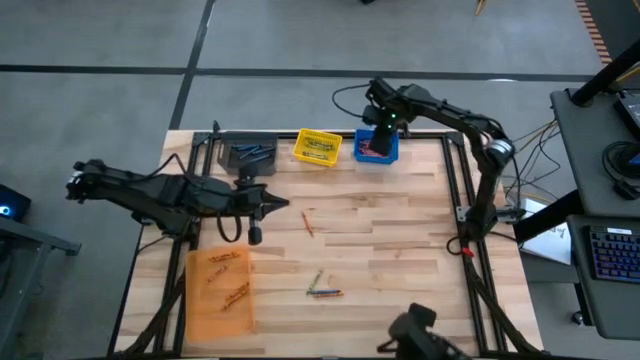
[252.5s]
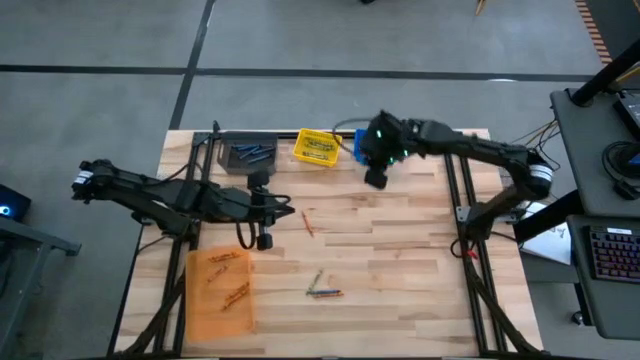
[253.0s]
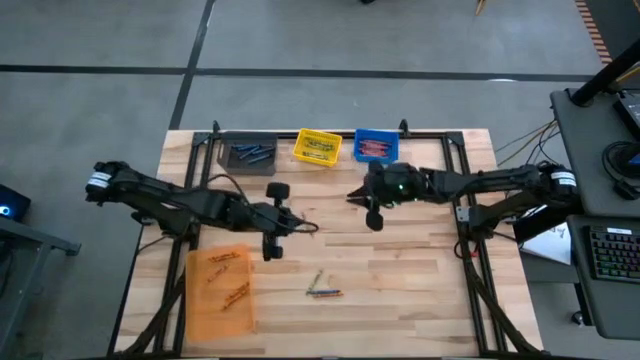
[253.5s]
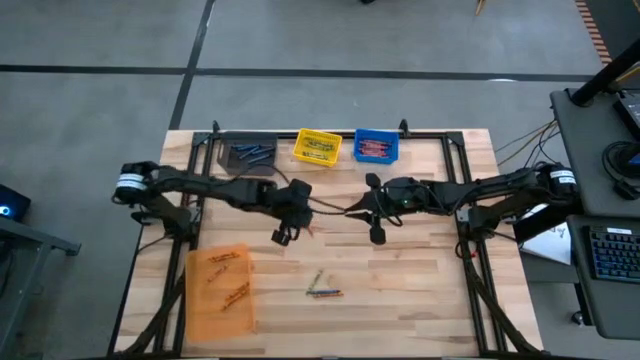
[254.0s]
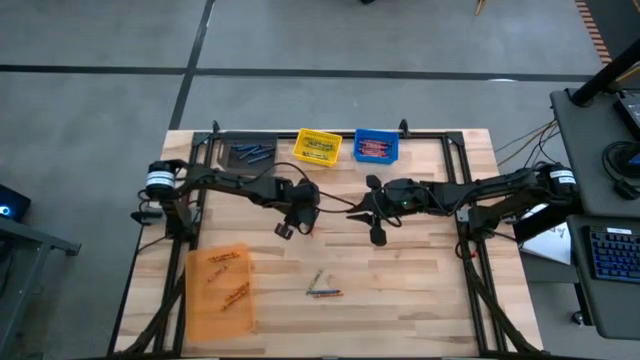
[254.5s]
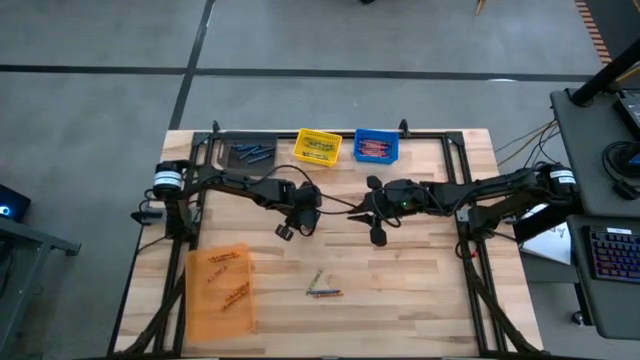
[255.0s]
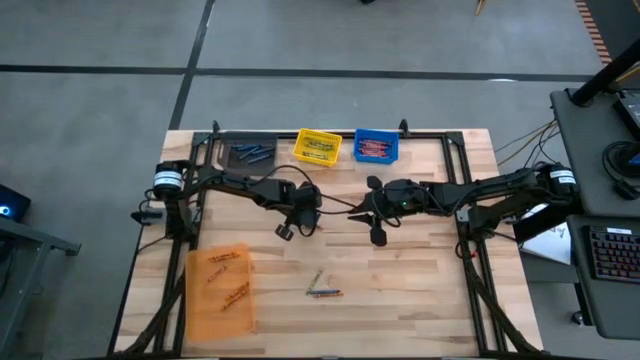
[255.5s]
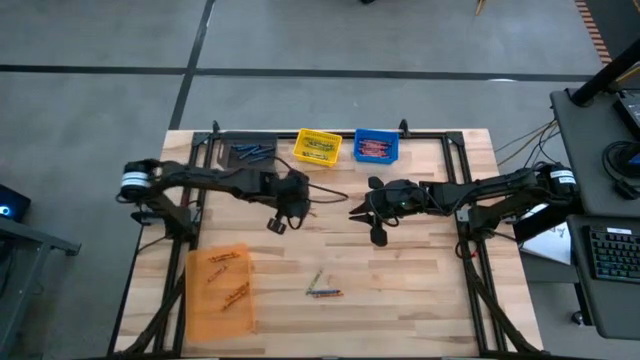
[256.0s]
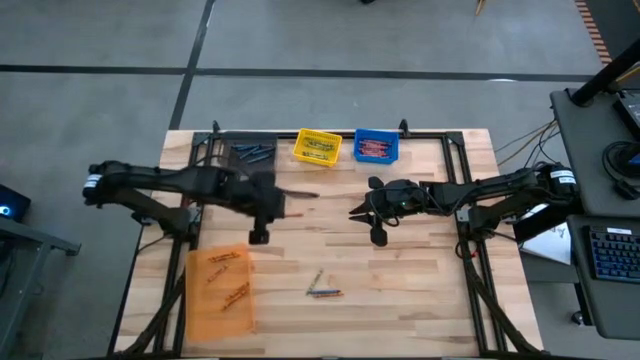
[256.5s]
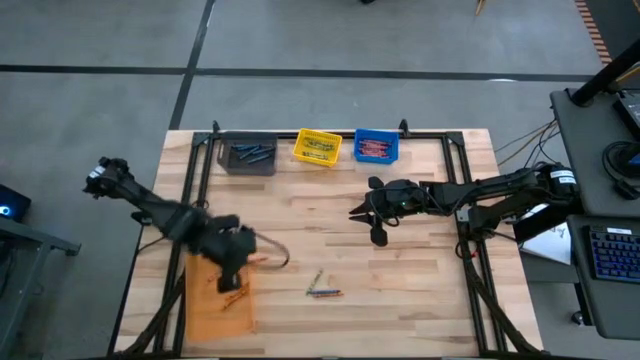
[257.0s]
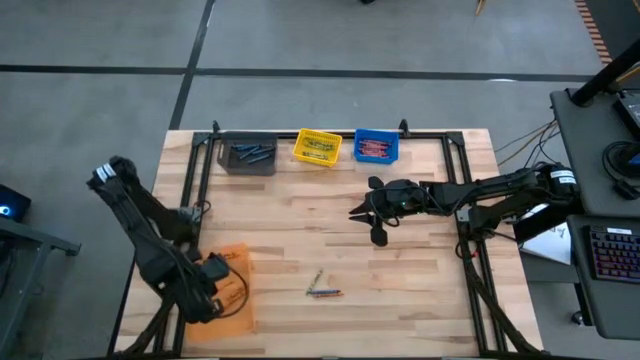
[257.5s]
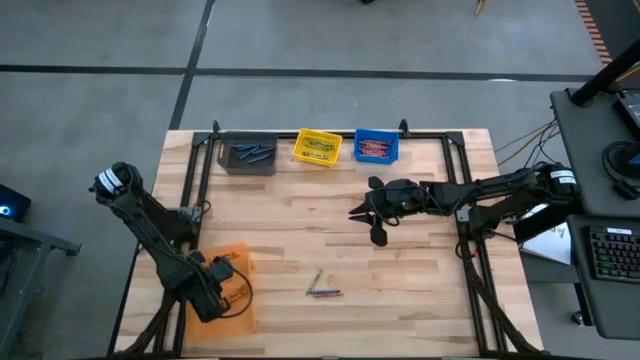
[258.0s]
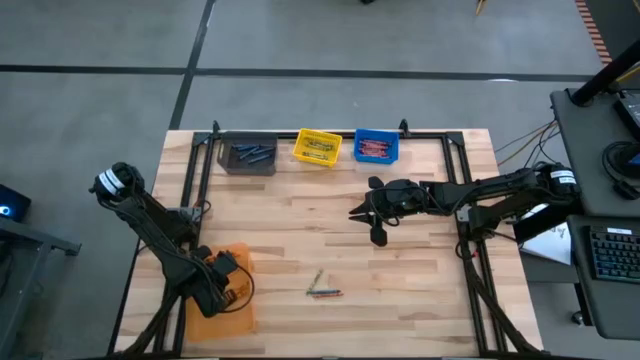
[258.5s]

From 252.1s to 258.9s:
Task: Sort crayons
Put the orange crayon into the orange bin

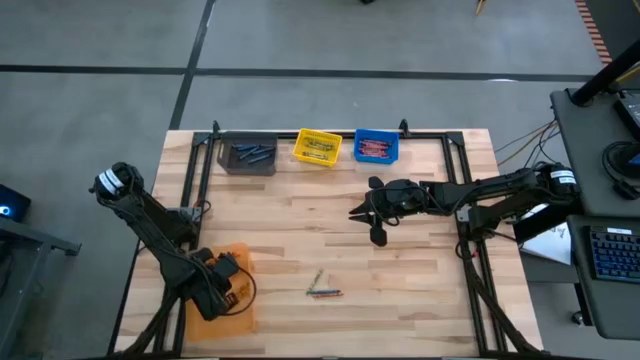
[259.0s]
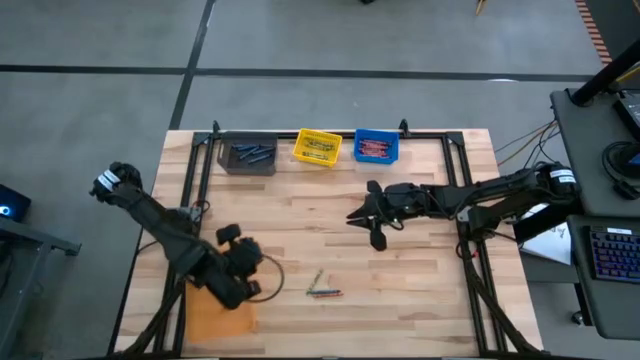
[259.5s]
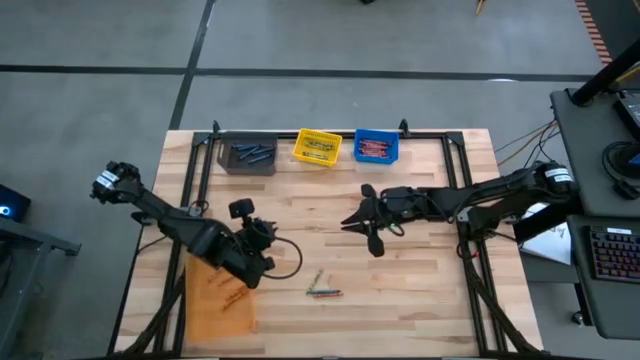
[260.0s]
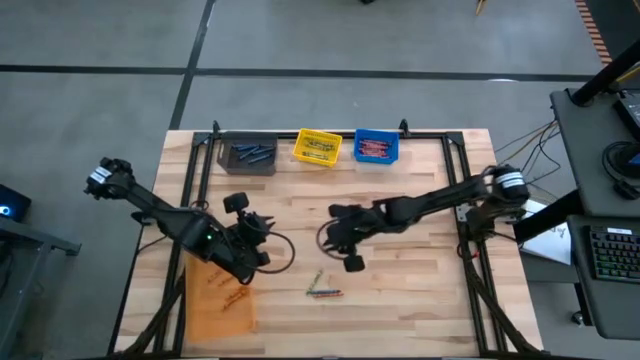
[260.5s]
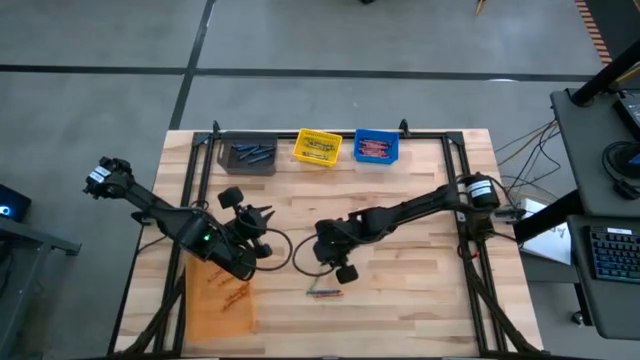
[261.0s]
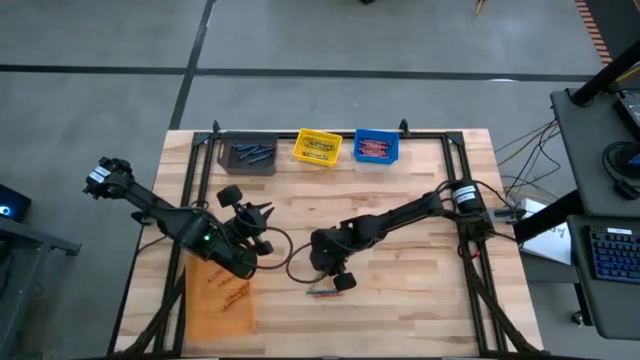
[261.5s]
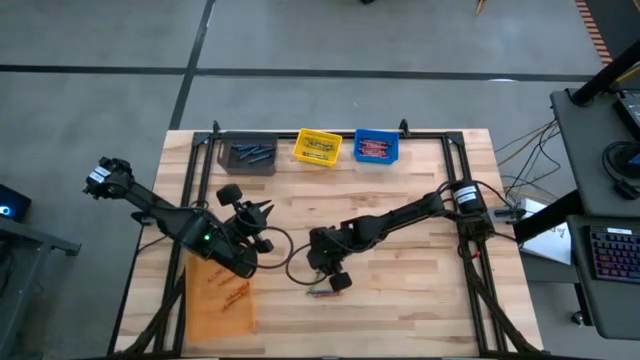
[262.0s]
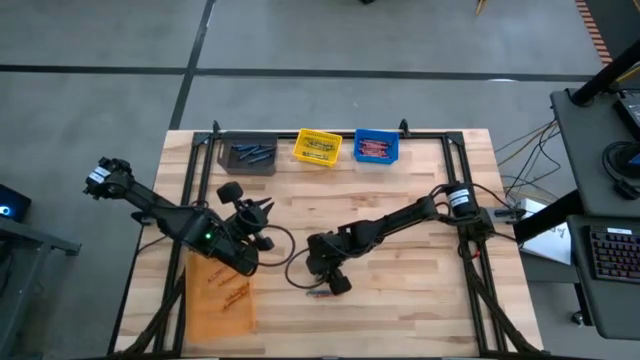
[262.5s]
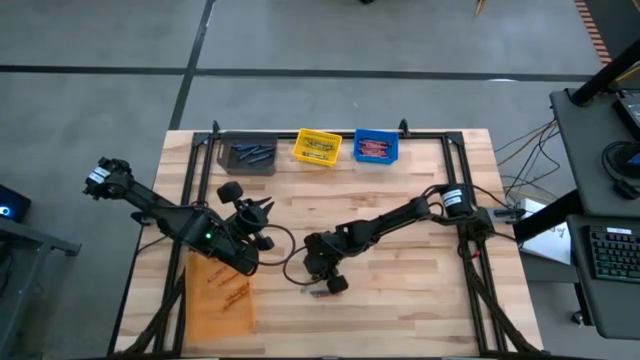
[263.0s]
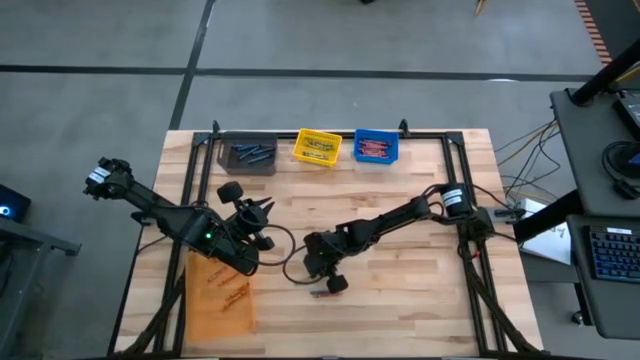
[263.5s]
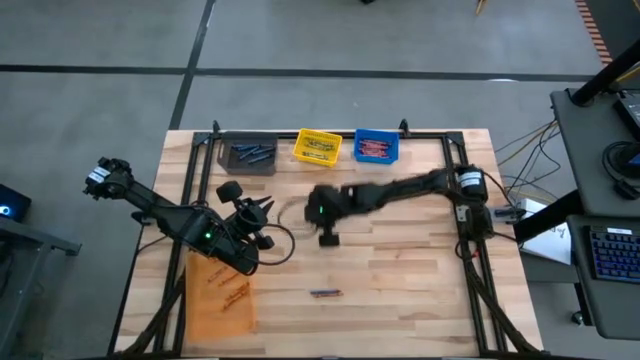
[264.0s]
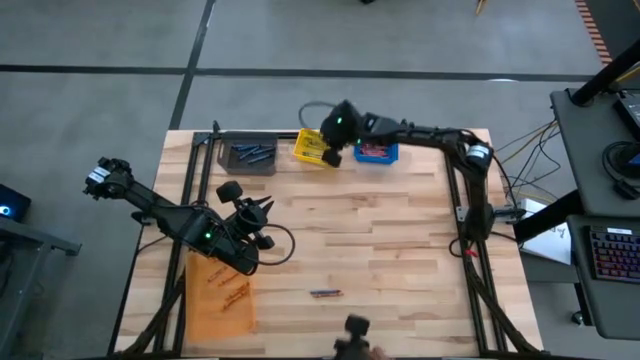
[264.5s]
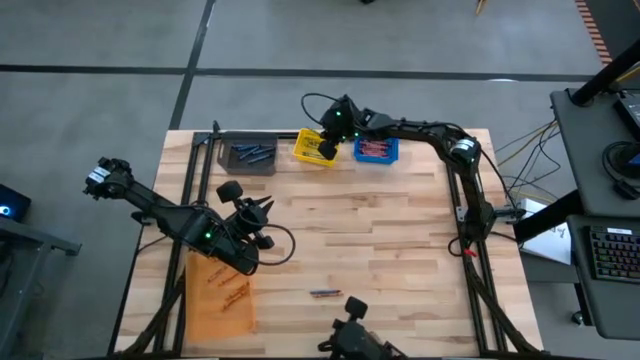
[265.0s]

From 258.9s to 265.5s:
Put the green crayon into the yellow bin

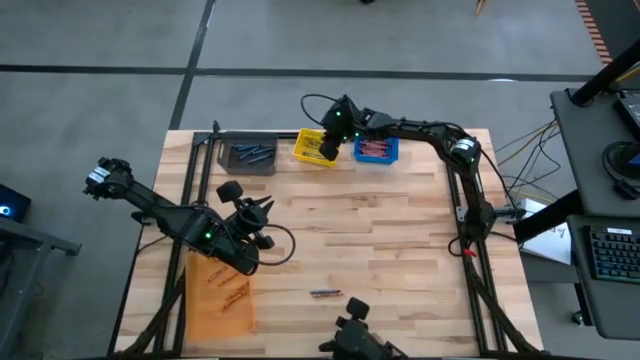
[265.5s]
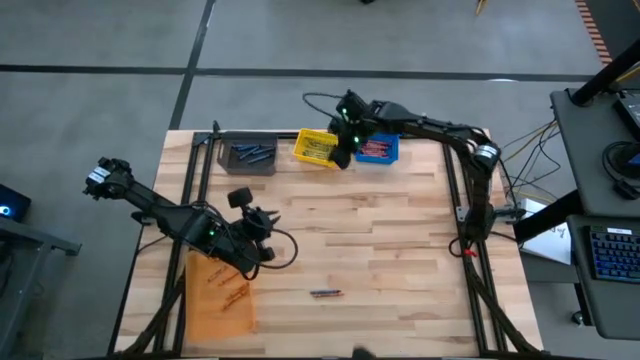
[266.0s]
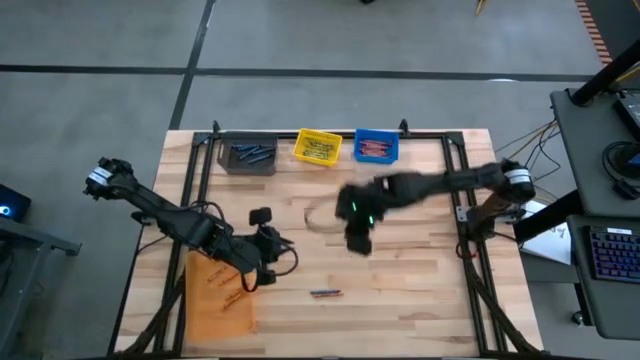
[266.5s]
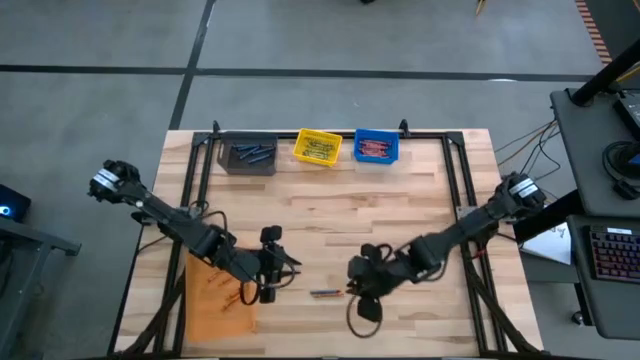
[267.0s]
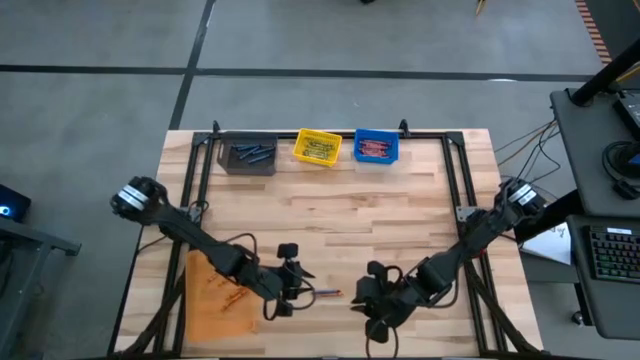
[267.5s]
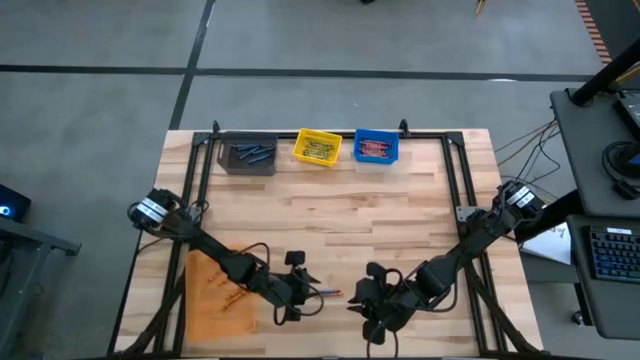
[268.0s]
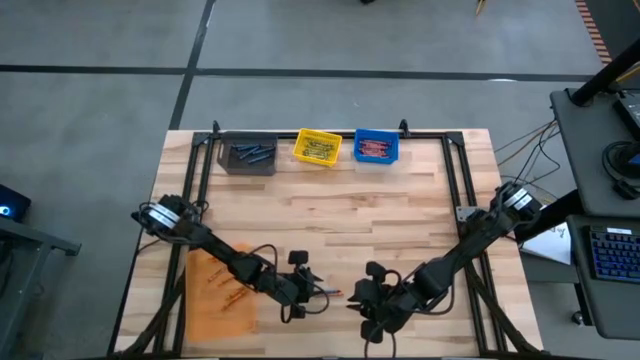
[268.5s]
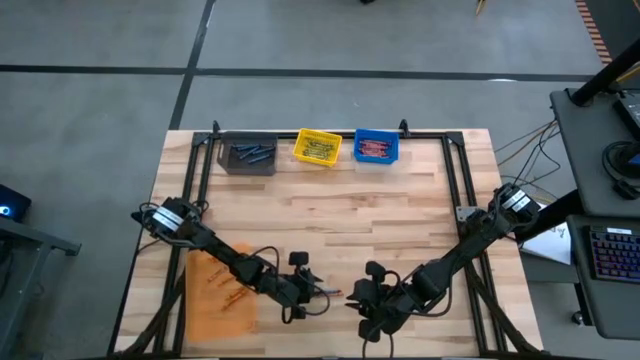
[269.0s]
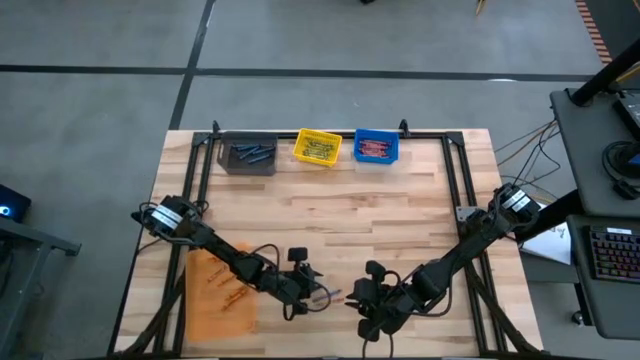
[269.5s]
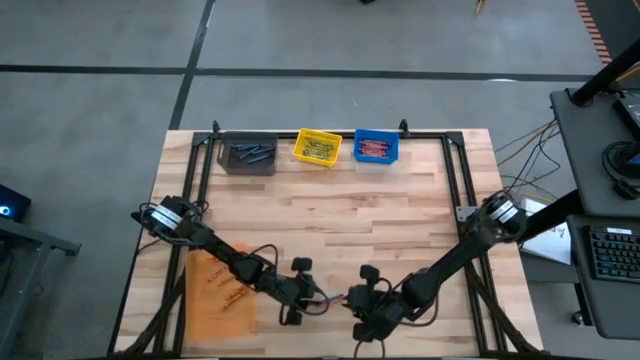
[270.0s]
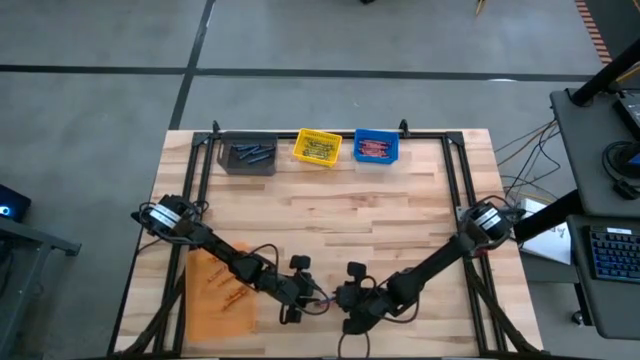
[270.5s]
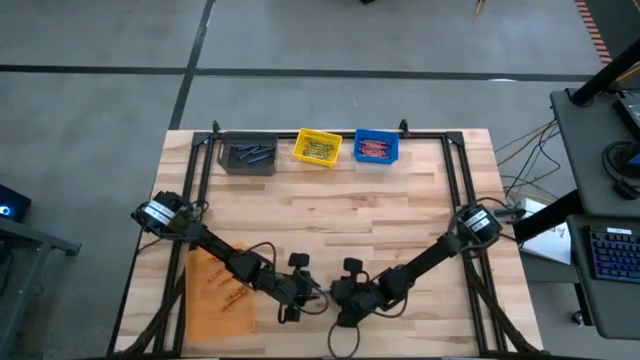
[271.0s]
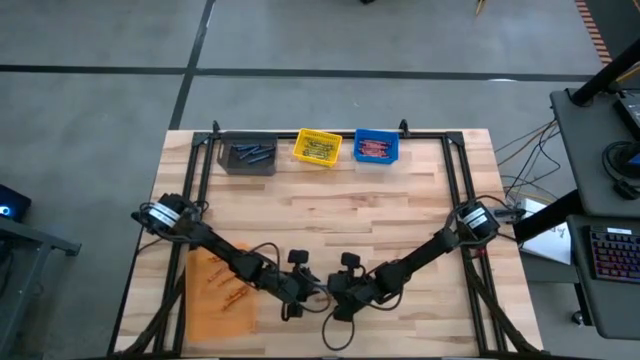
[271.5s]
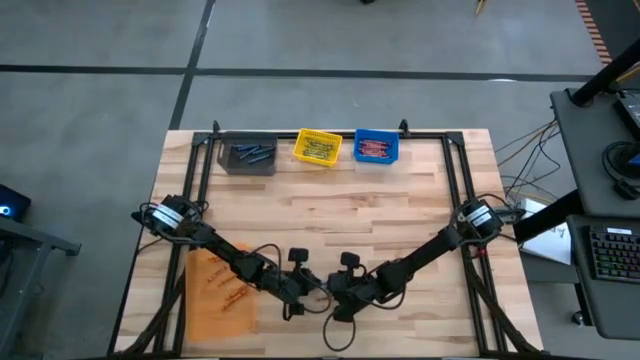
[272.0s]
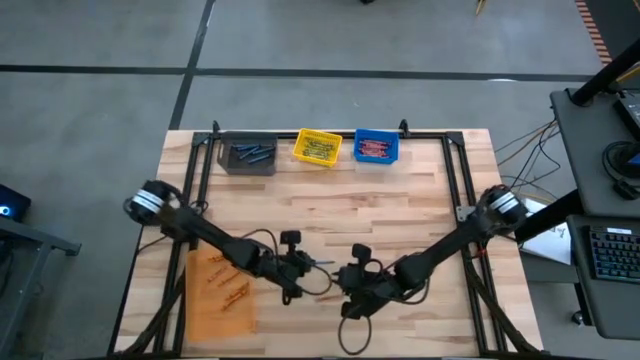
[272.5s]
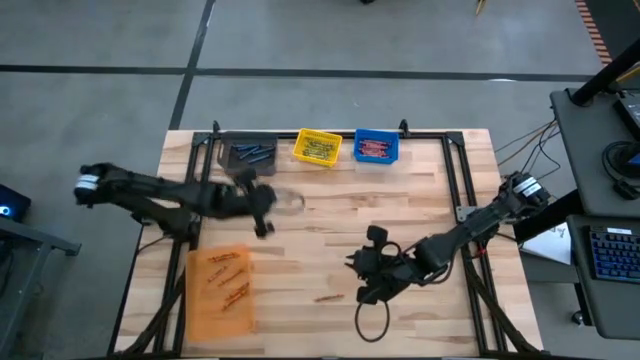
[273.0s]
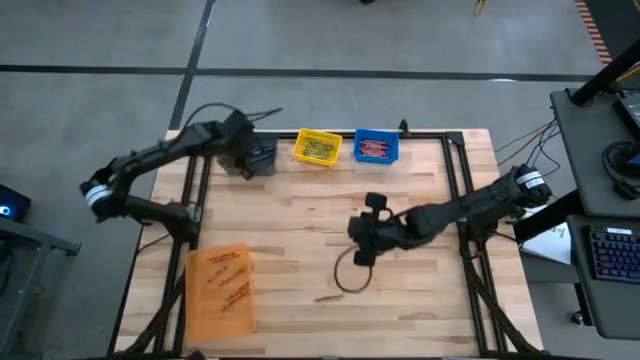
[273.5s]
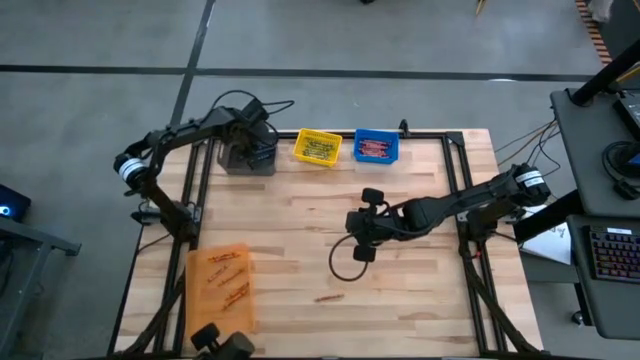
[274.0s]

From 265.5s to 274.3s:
Put the blue crayon into the black bin
